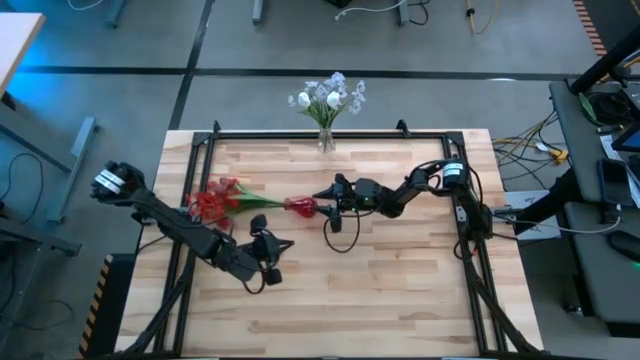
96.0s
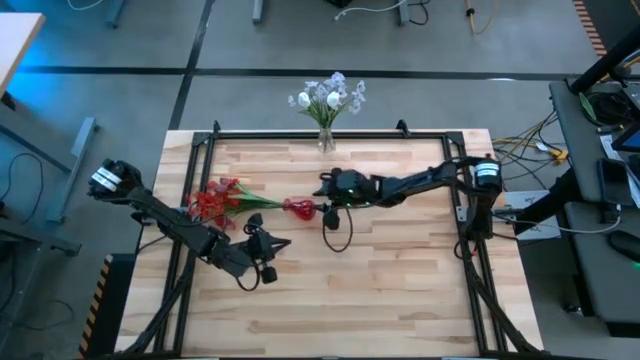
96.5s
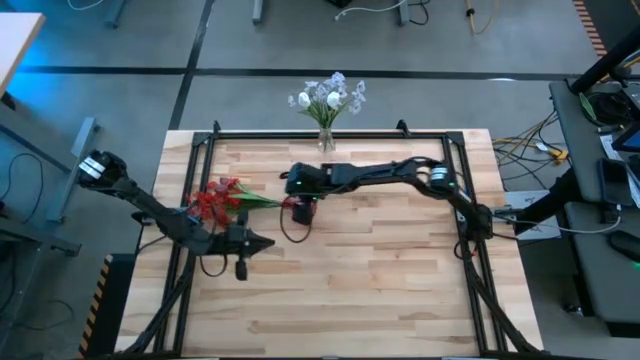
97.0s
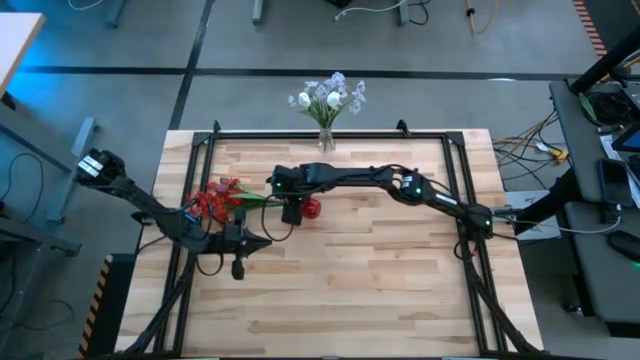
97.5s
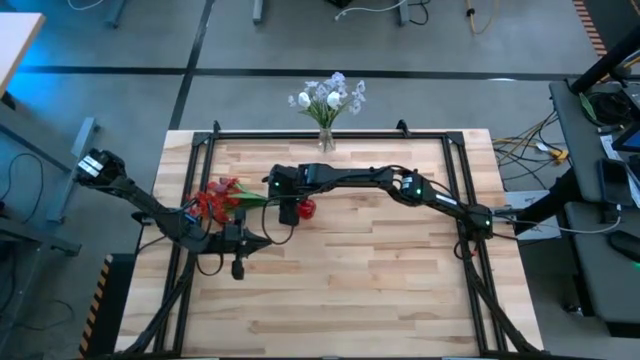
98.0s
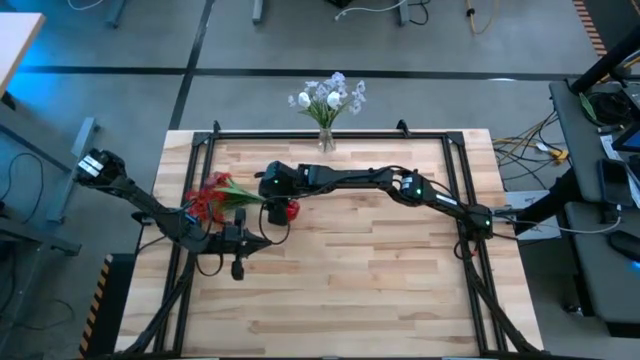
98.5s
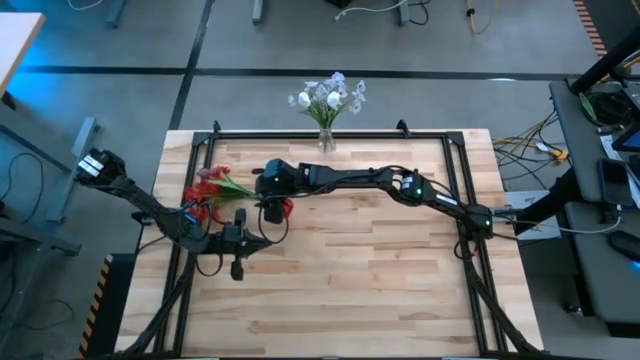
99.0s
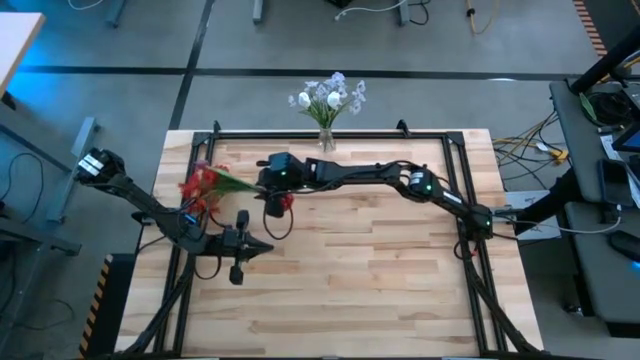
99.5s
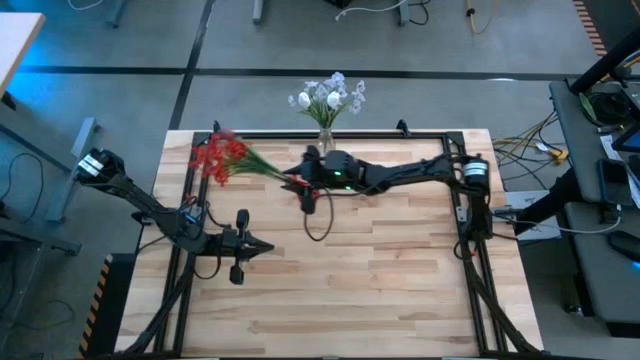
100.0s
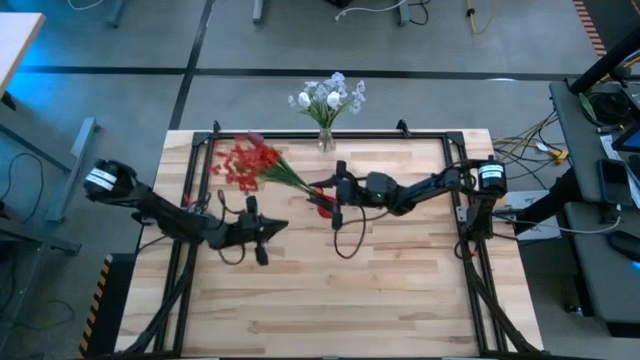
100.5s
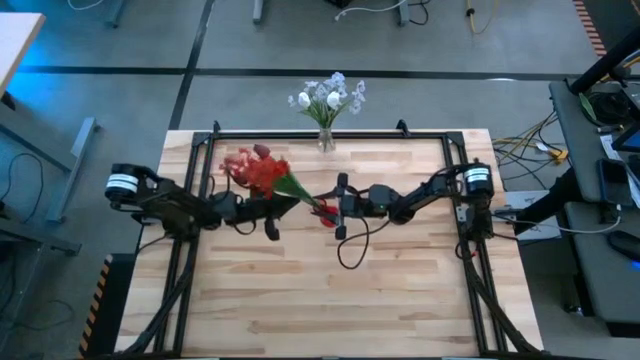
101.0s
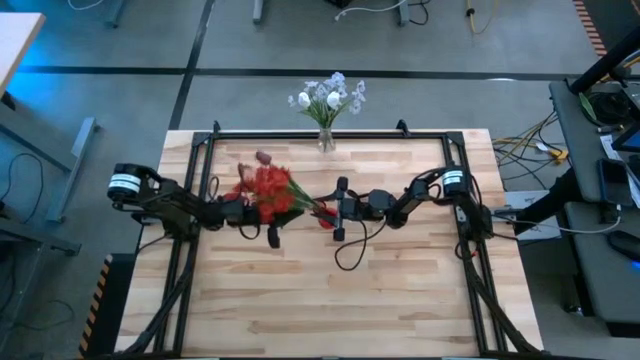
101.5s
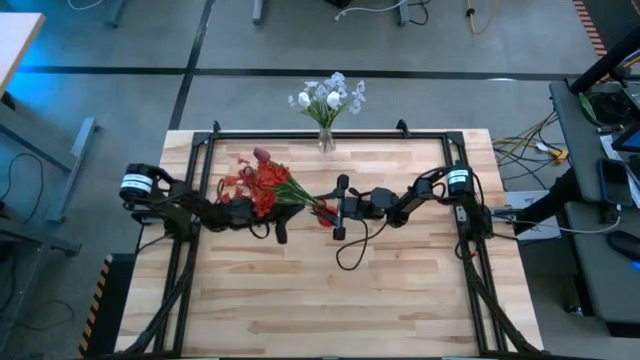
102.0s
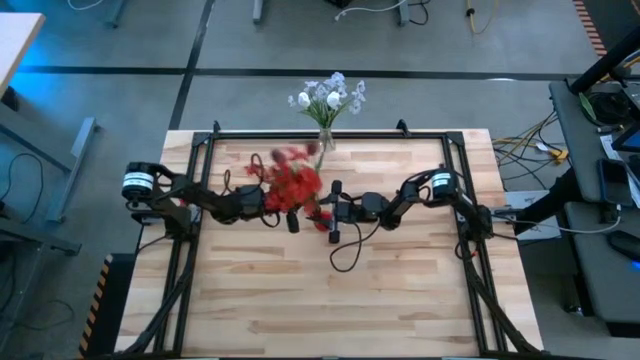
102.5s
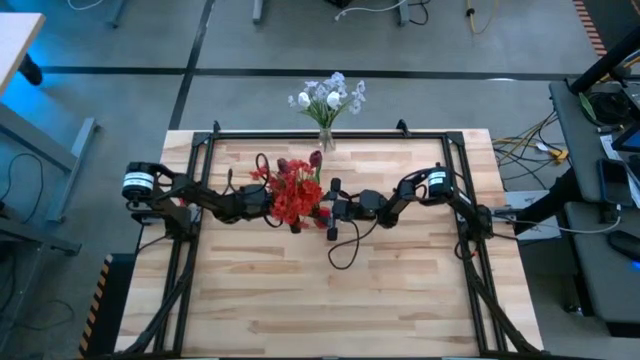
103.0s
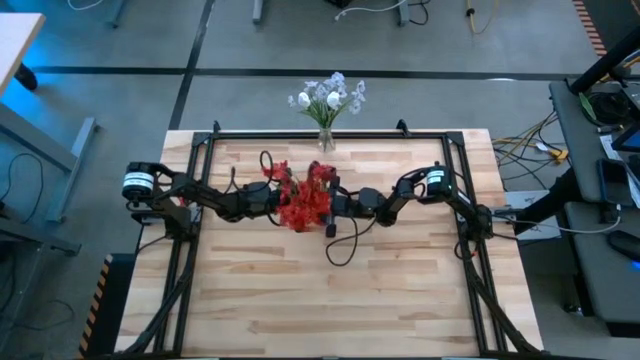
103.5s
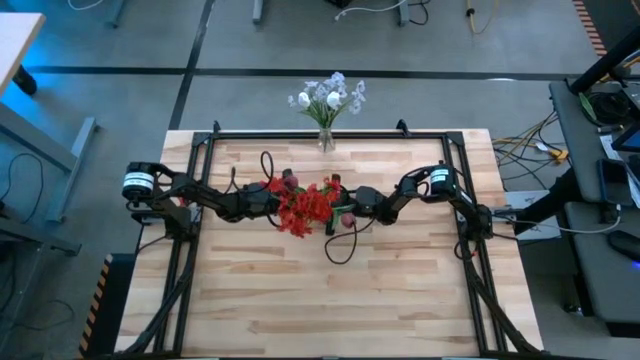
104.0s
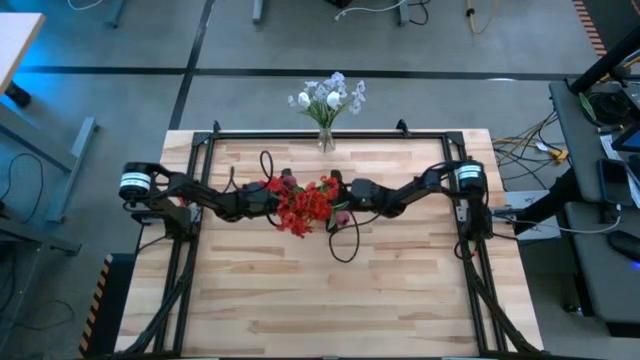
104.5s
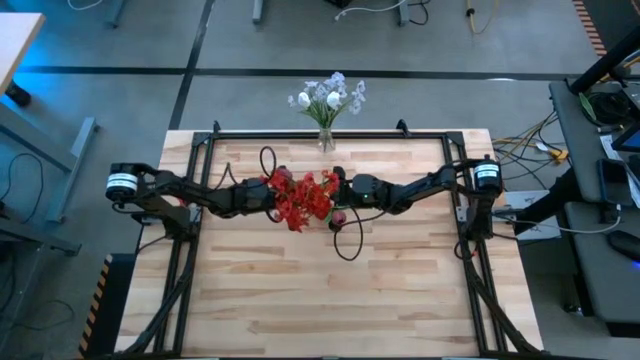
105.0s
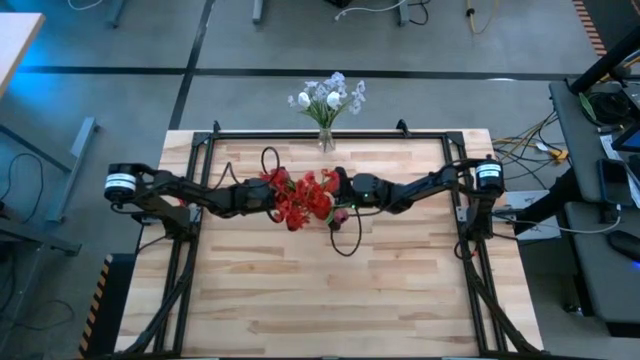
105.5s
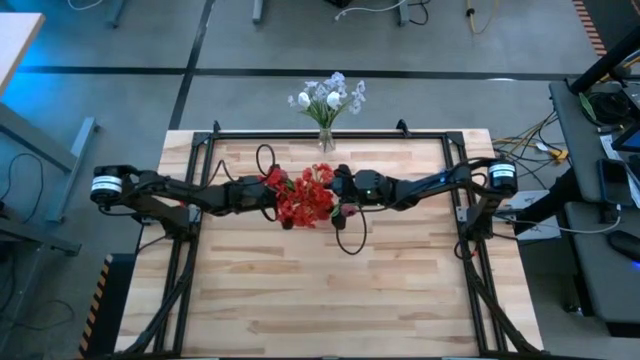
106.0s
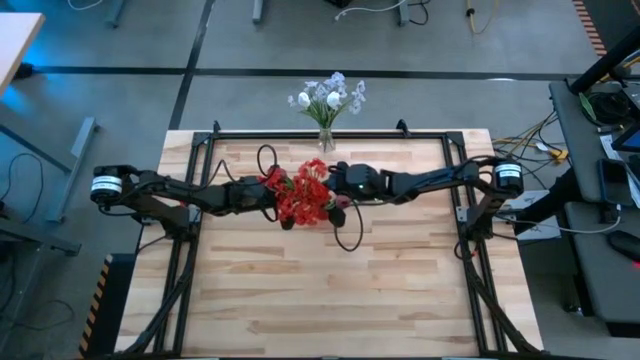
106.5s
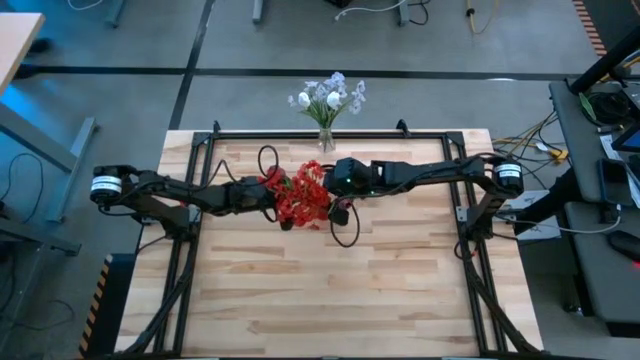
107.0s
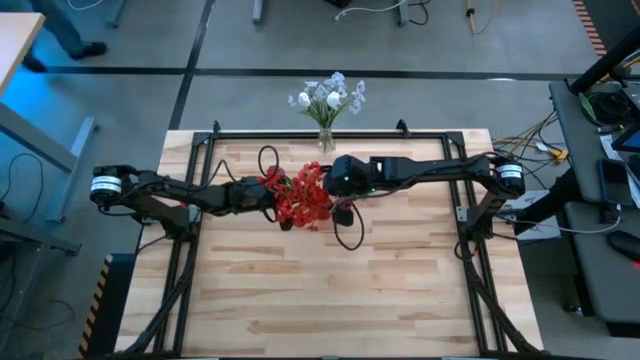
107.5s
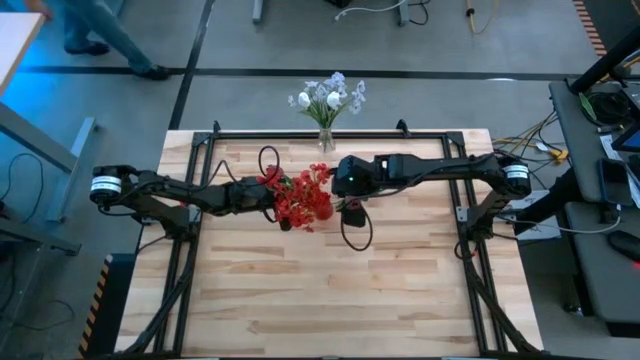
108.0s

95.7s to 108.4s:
Task: Sort flowers into vase by color
Adjust the red flower vase

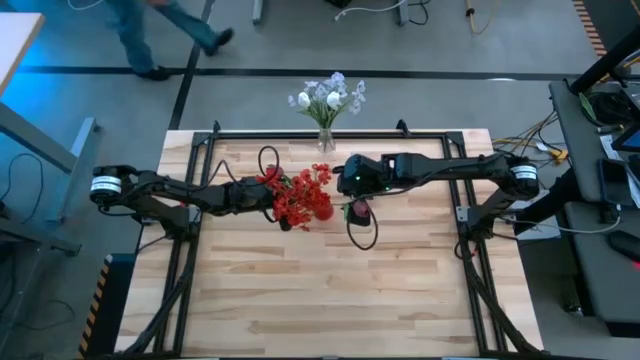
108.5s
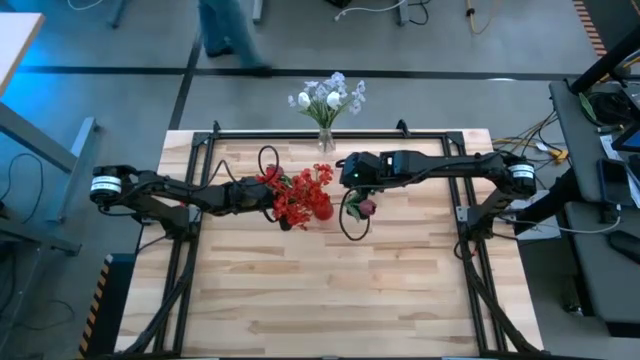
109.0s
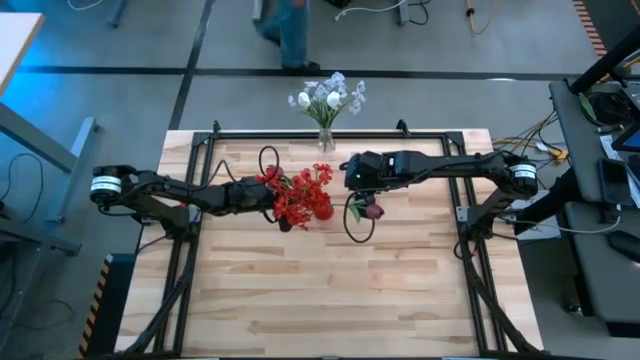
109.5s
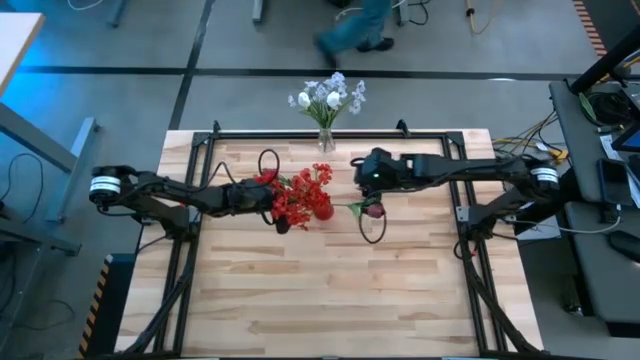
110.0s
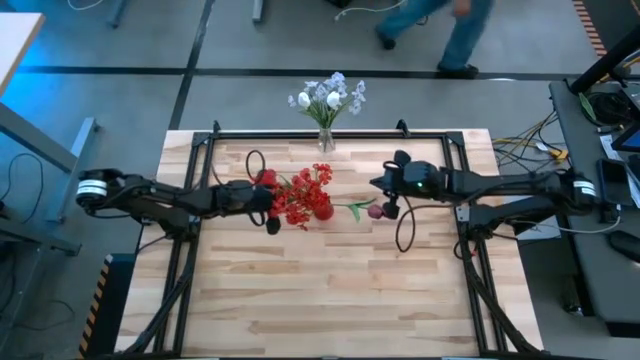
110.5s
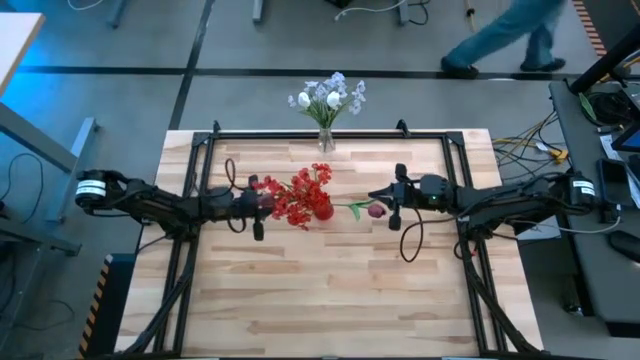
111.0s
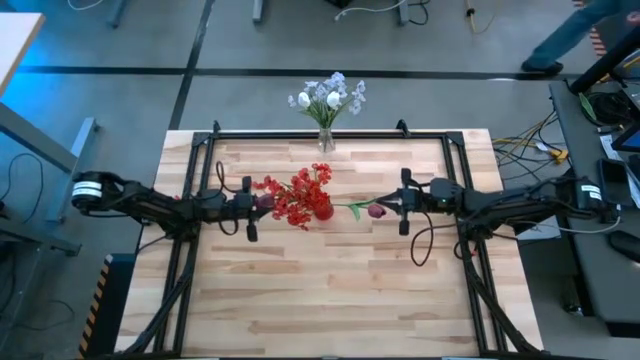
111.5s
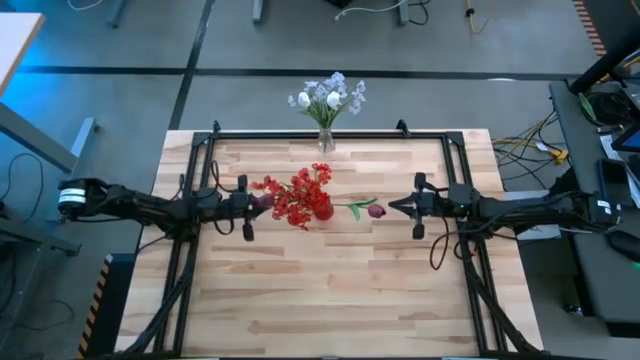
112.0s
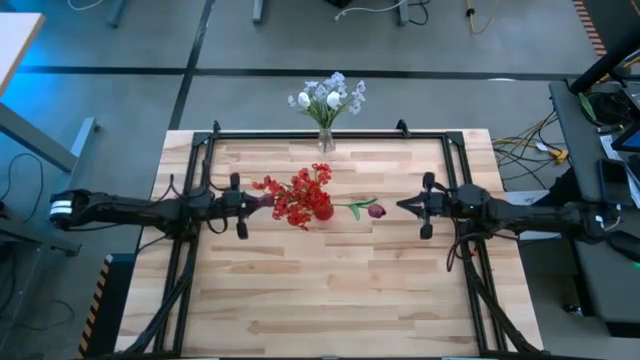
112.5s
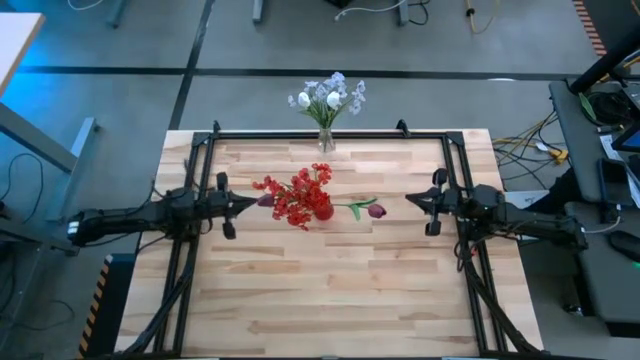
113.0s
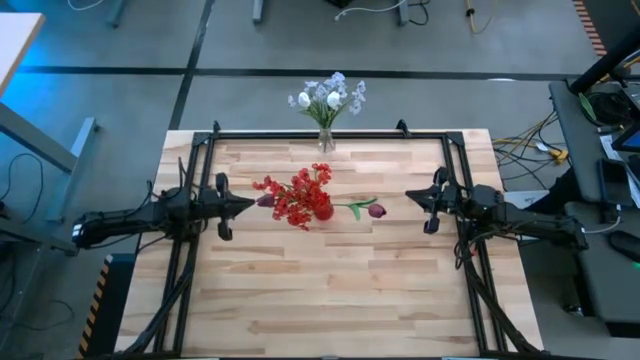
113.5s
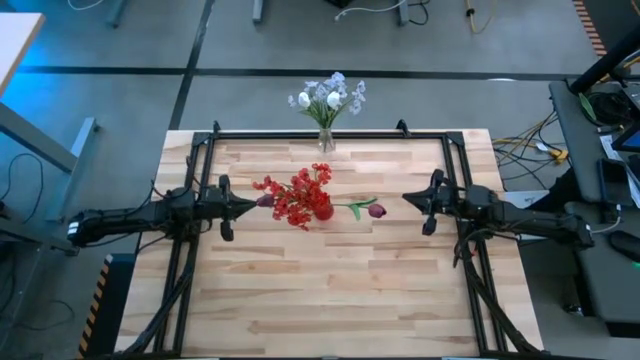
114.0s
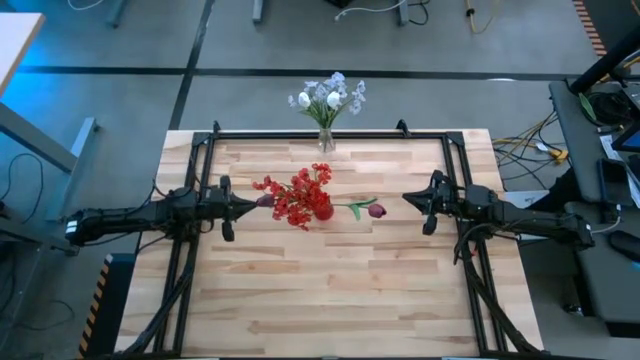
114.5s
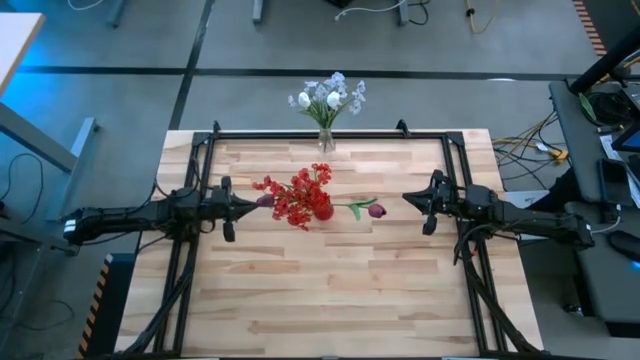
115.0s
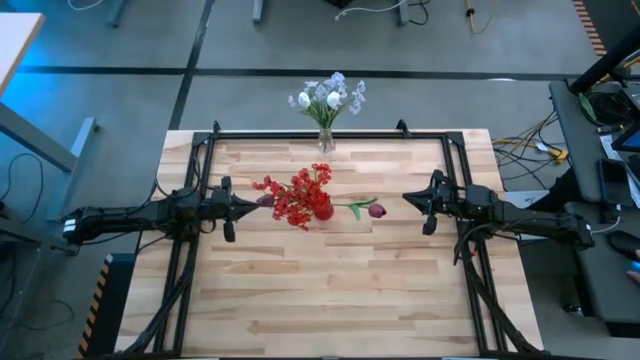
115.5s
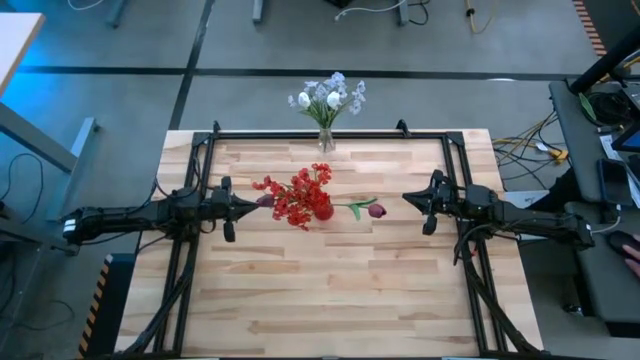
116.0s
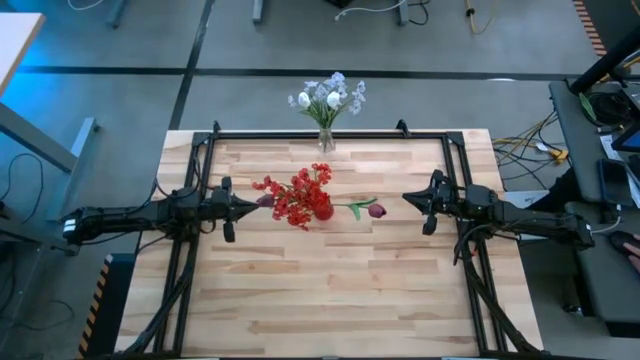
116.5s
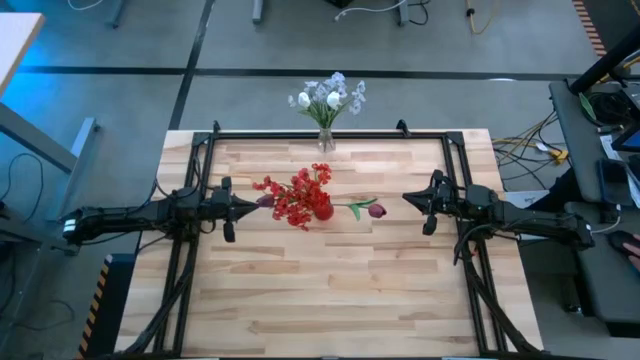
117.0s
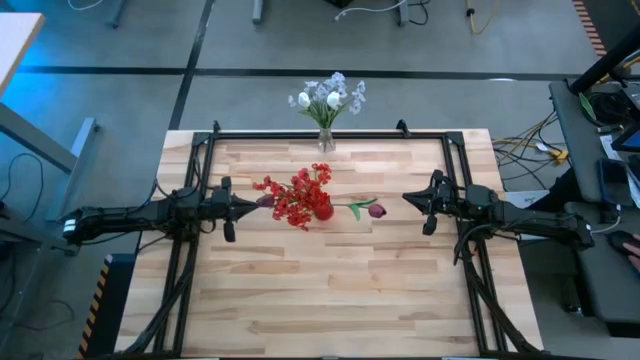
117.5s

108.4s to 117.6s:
Return to Home Position
